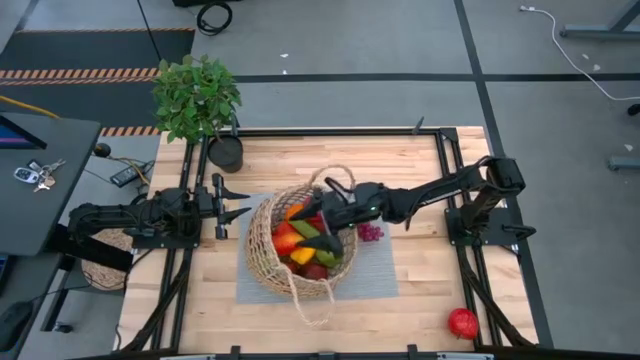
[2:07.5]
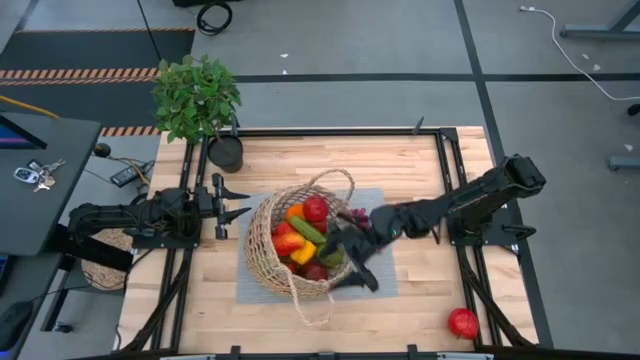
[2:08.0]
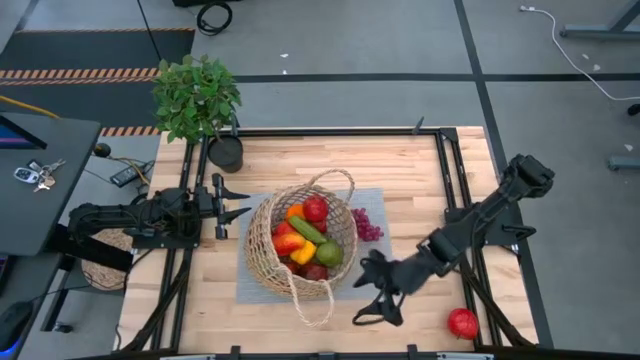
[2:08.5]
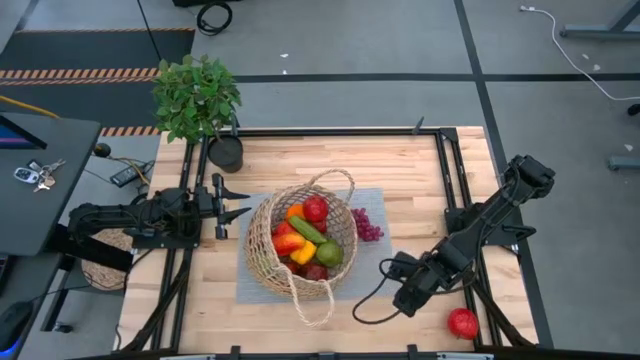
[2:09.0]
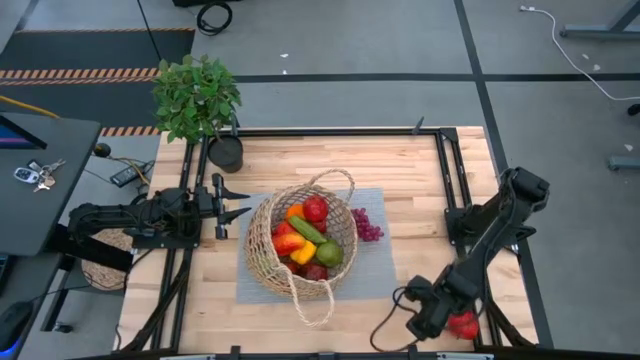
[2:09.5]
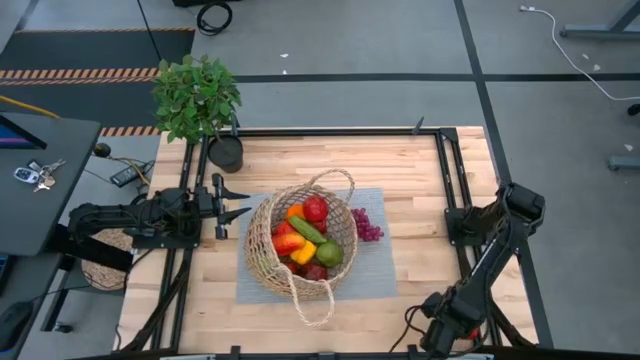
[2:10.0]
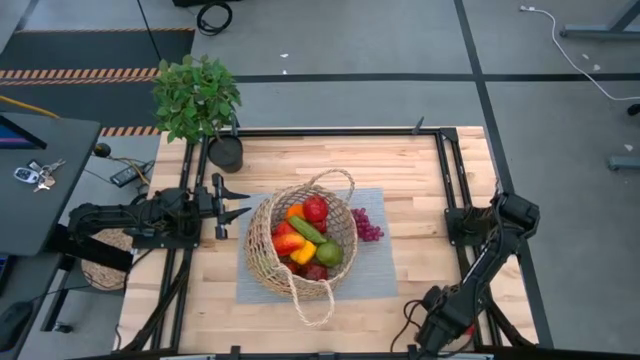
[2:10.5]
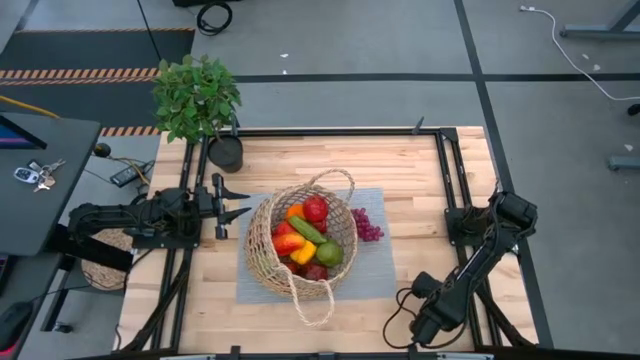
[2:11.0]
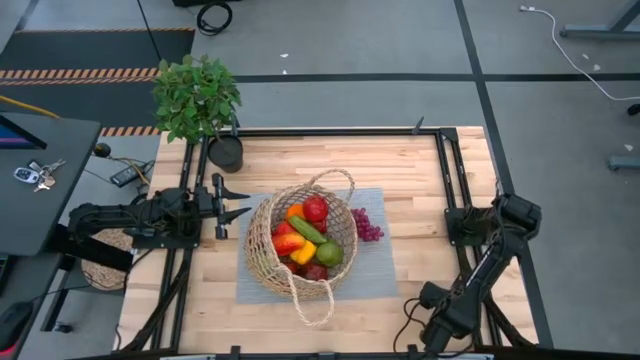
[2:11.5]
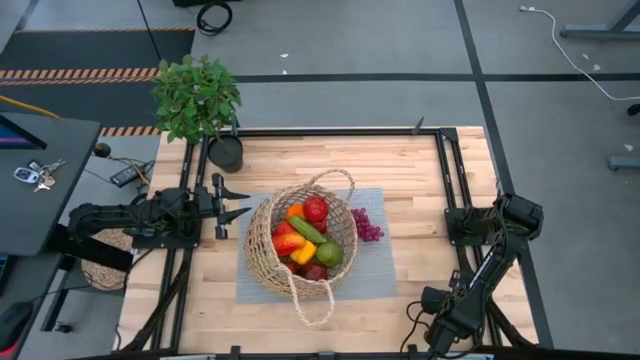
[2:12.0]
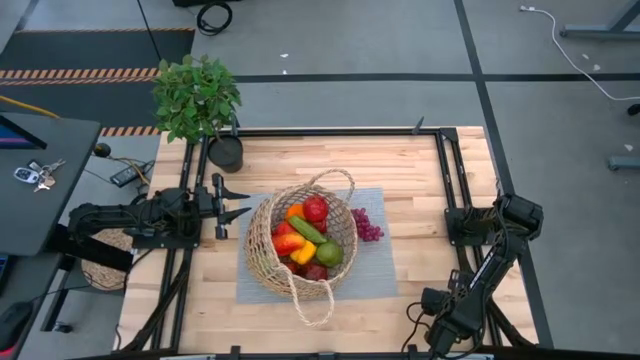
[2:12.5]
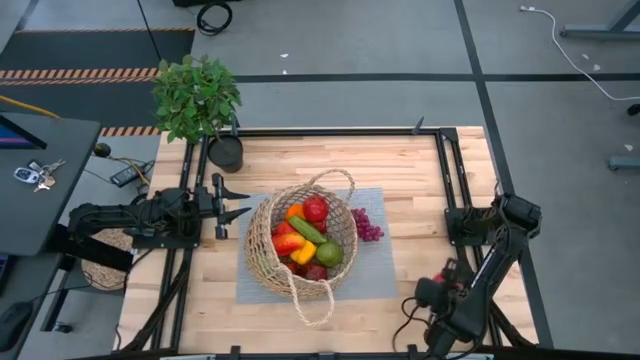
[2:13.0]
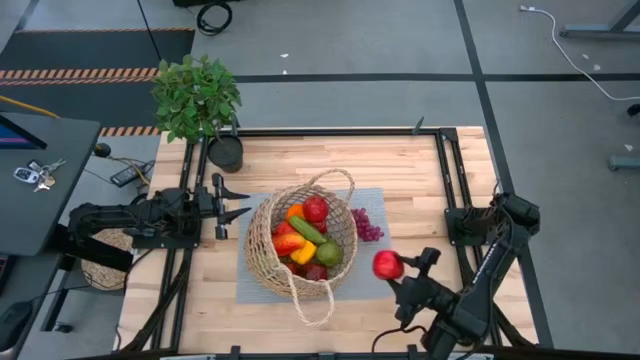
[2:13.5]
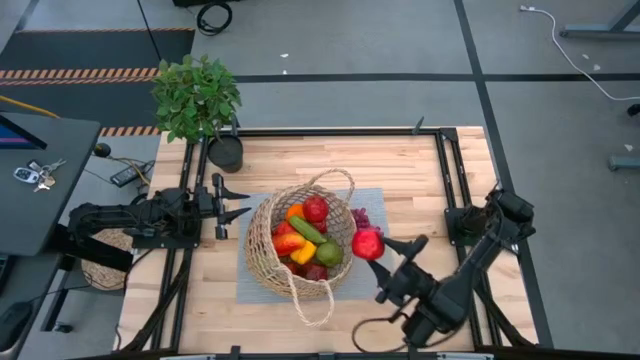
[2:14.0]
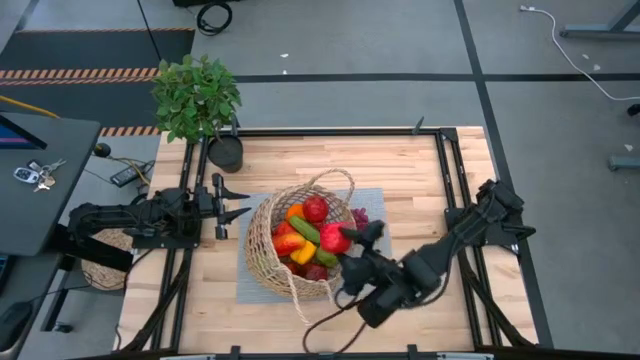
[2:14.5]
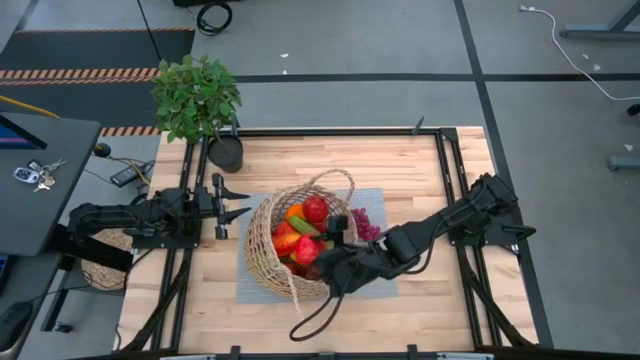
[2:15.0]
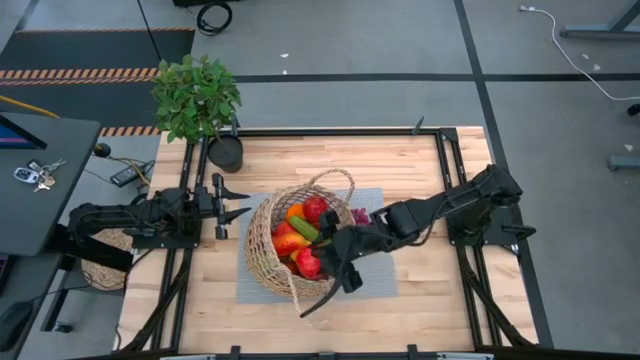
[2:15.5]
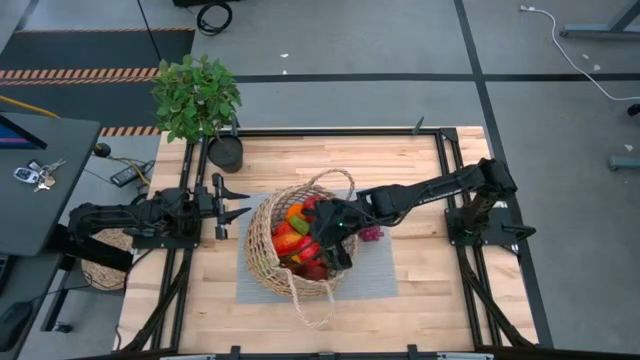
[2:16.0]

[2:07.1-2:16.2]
Task: Build produce basket
Put the red apple in the basket

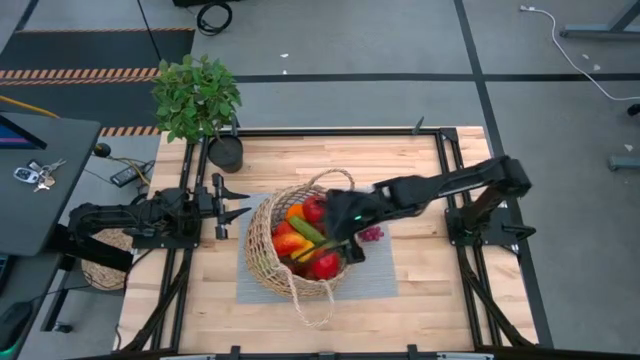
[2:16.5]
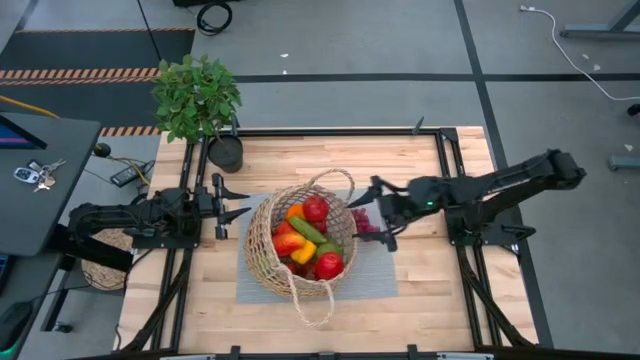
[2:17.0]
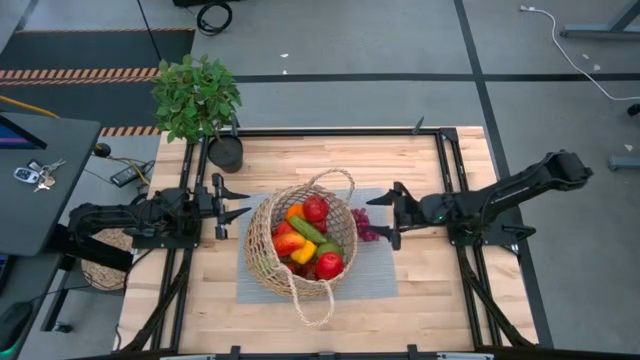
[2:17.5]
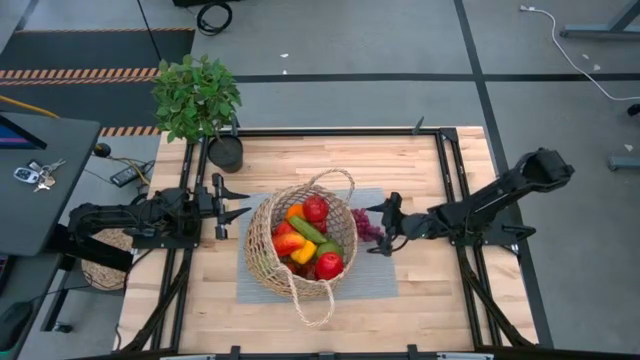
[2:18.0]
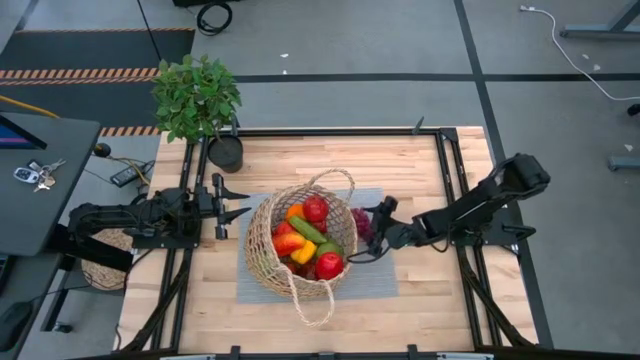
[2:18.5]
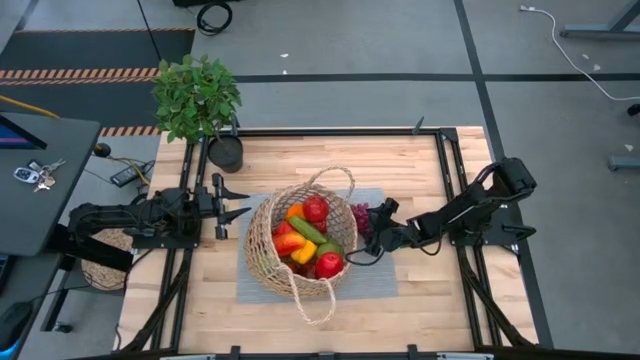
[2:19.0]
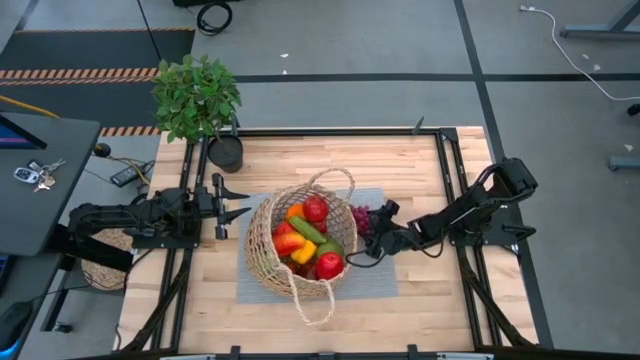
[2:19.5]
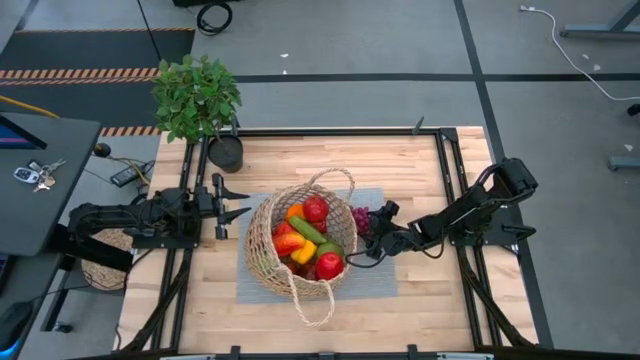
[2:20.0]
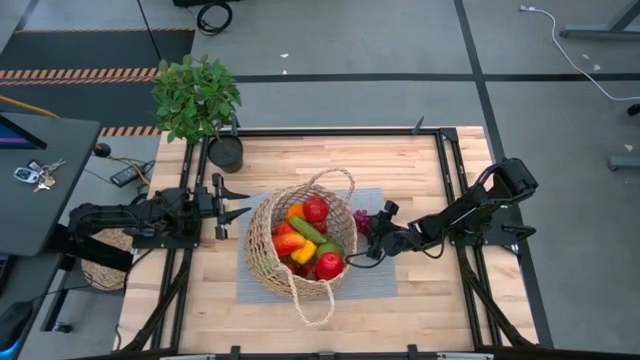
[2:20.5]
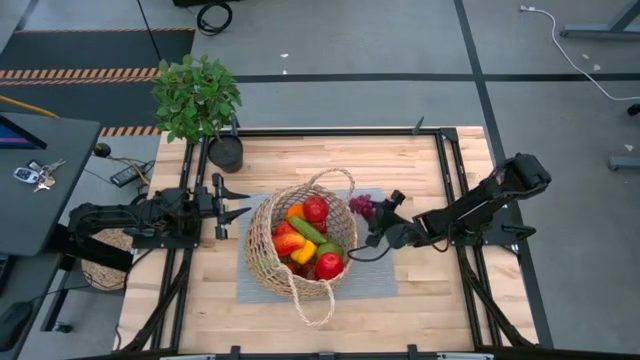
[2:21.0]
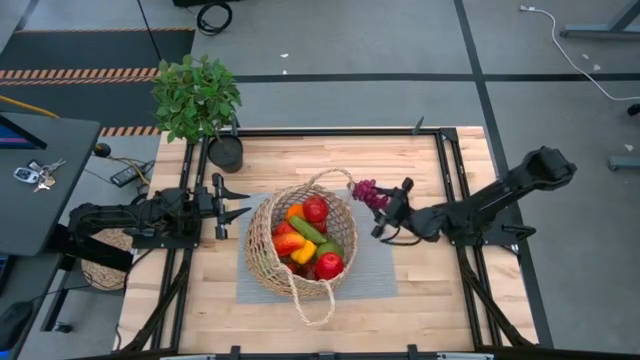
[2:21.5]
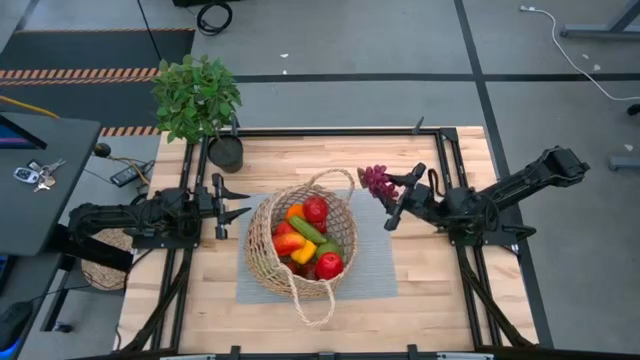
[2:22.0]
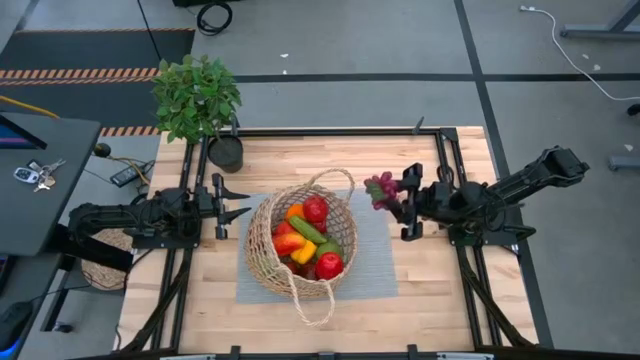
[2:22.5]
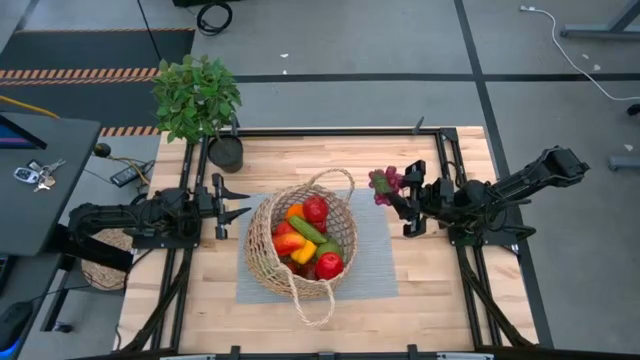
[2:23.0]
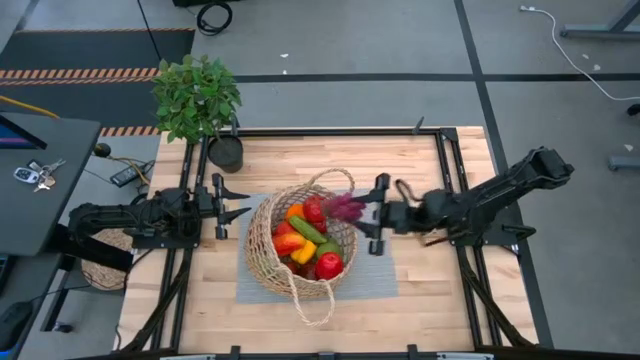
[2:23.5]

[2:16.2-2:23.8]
Put the grapes in the basket

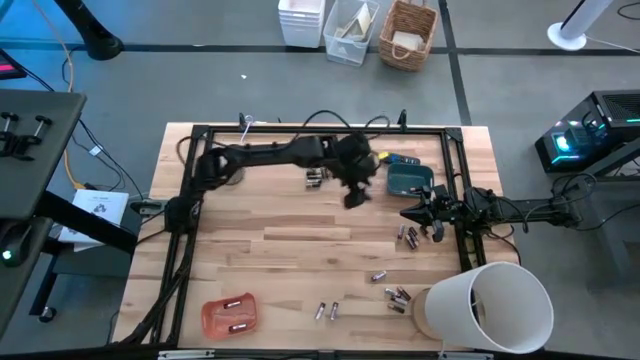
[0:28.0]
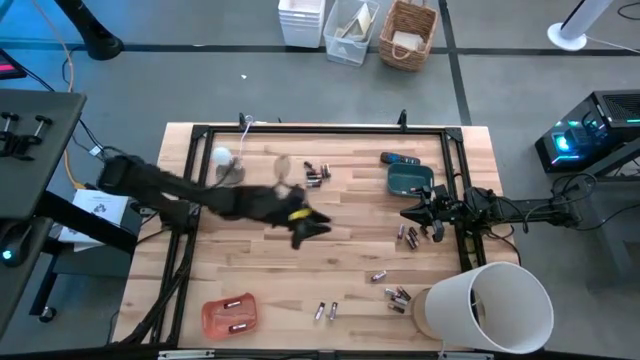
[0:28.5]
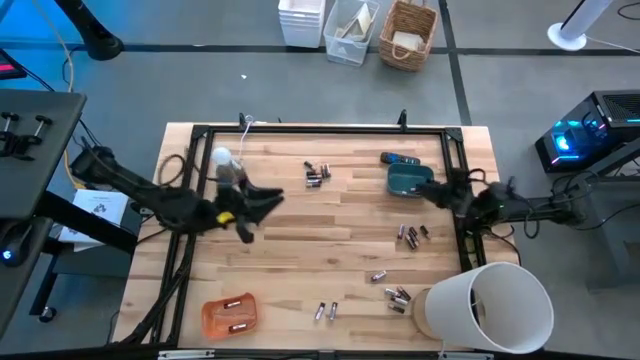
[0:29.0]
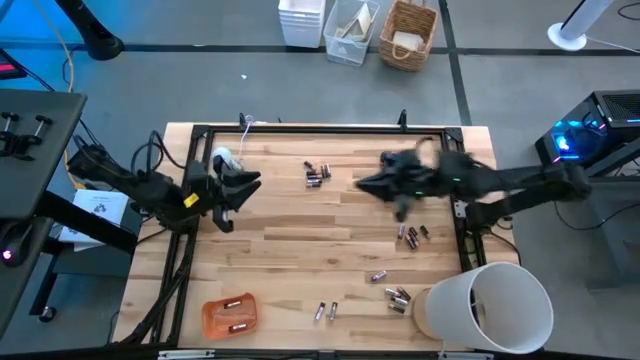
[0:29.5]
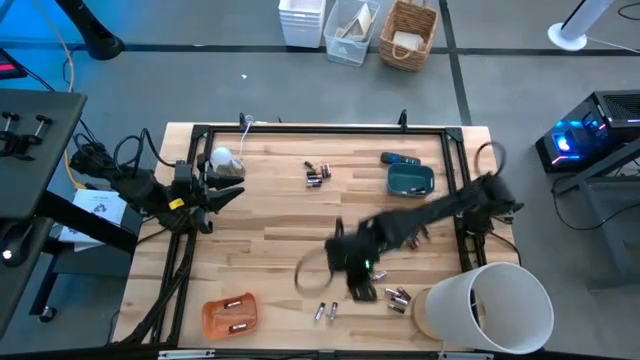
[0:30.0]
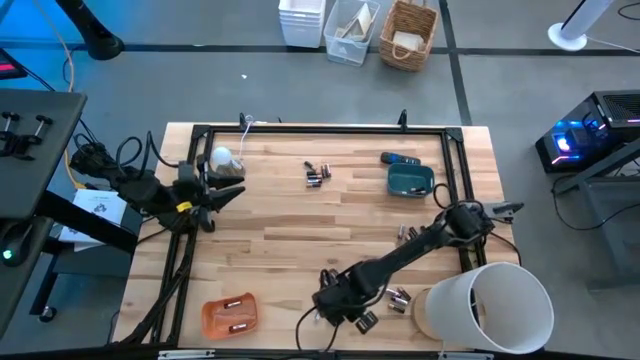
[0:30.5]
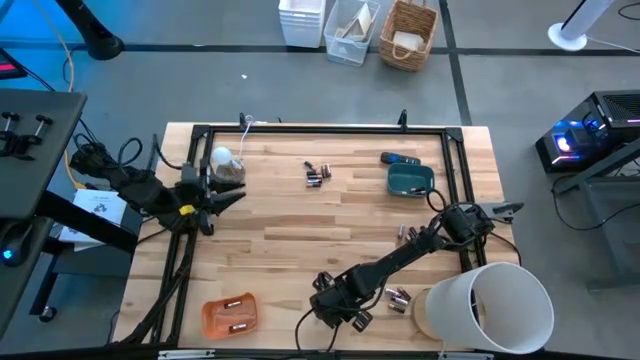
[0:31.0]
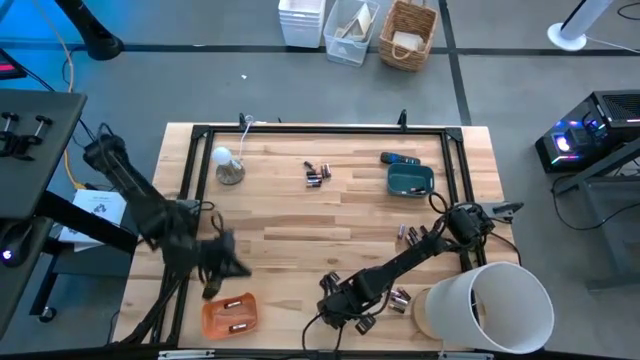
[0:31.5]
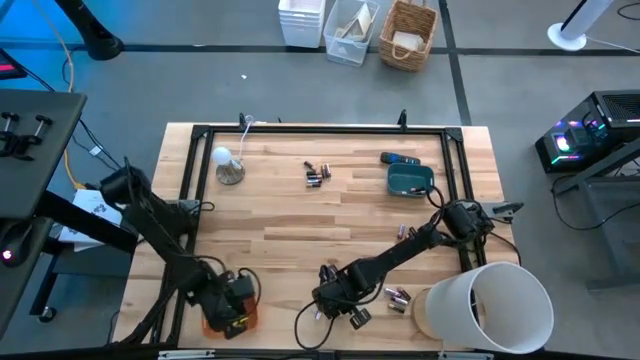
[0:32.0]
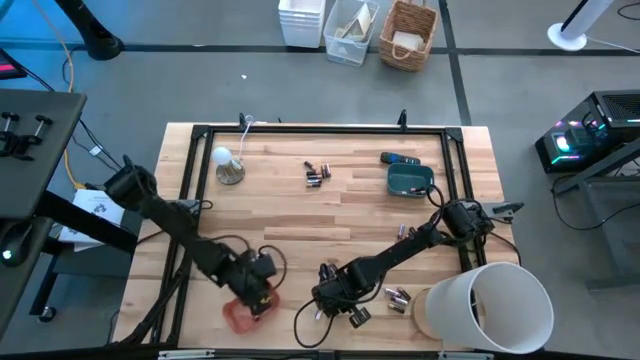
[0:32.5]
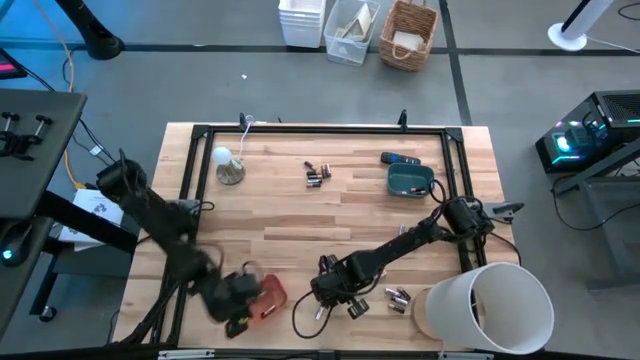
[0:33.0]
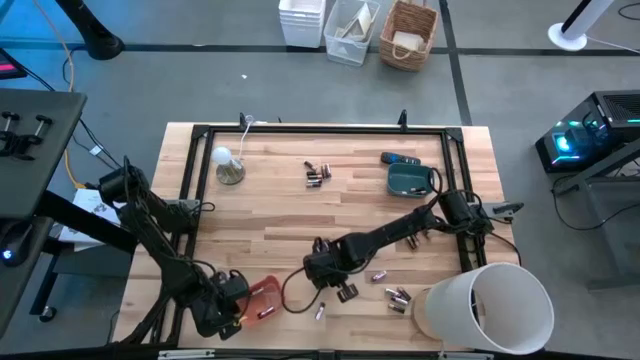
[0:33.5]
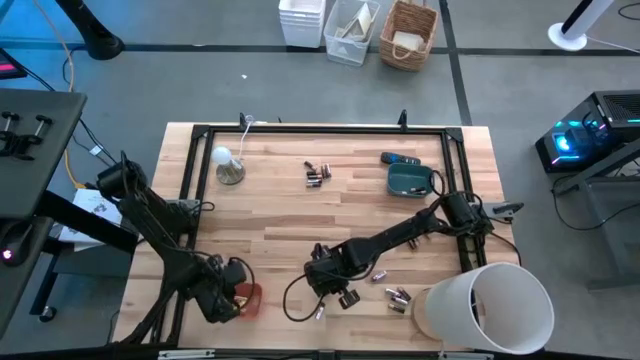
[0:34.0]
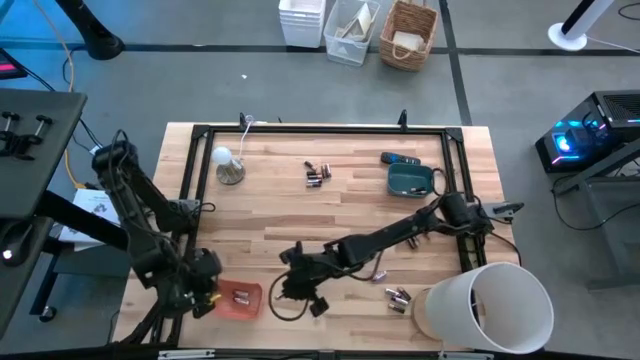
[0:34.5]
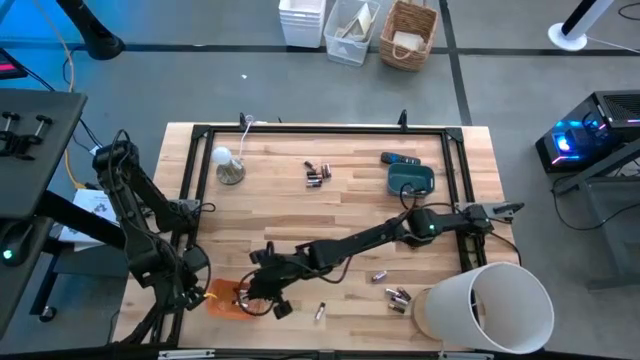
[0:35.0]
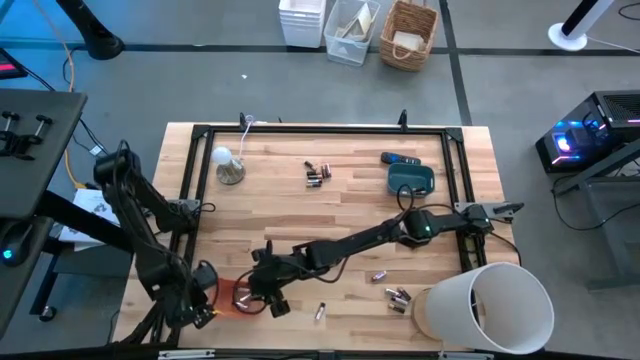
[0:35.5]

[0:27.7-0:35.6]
Task: Sort batteries
Put the silver battery into the orange bin
